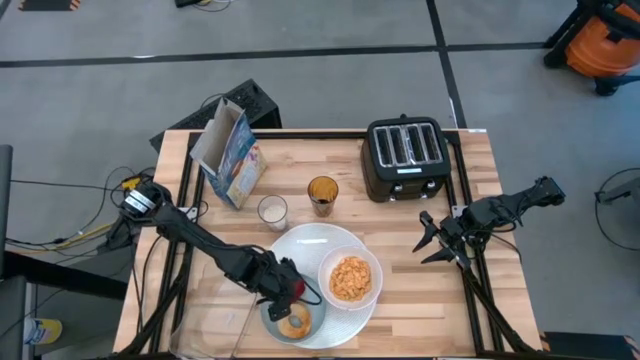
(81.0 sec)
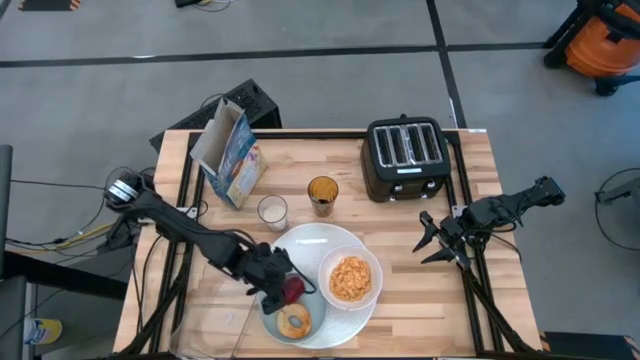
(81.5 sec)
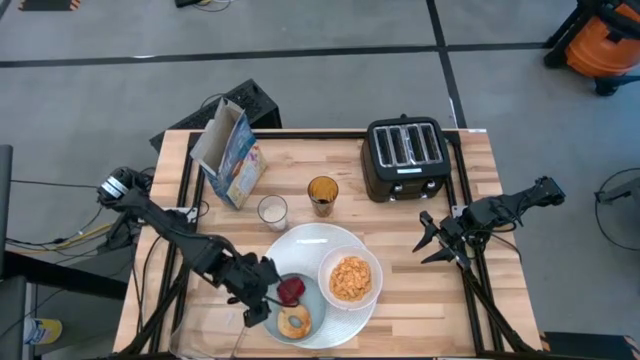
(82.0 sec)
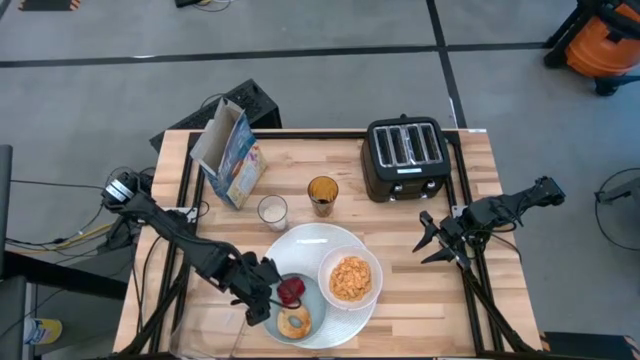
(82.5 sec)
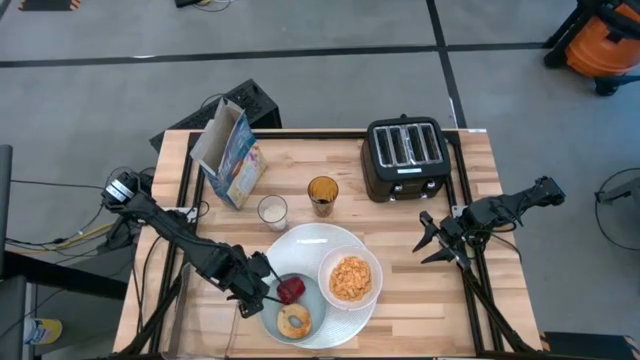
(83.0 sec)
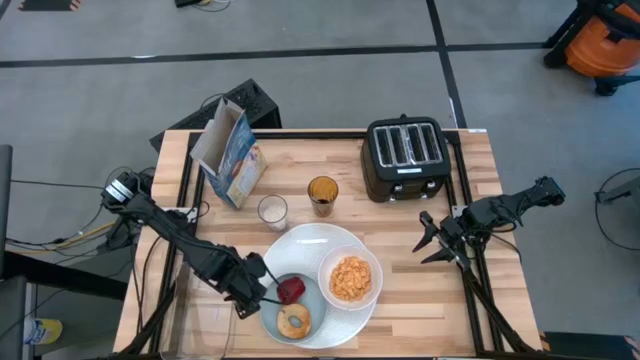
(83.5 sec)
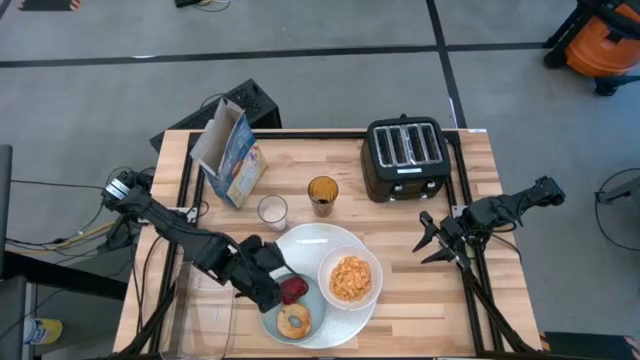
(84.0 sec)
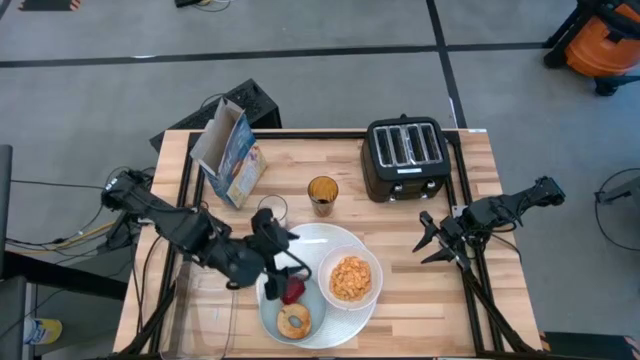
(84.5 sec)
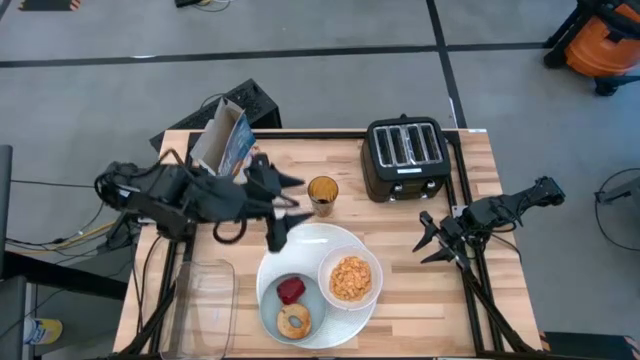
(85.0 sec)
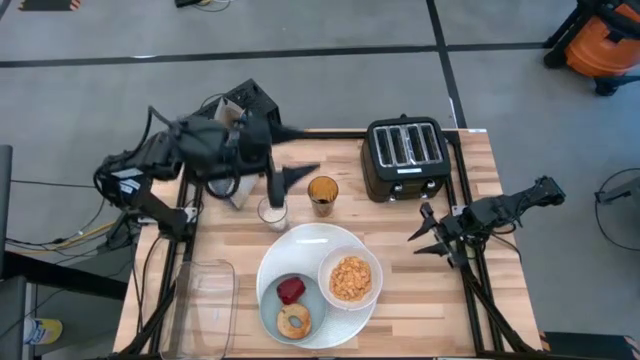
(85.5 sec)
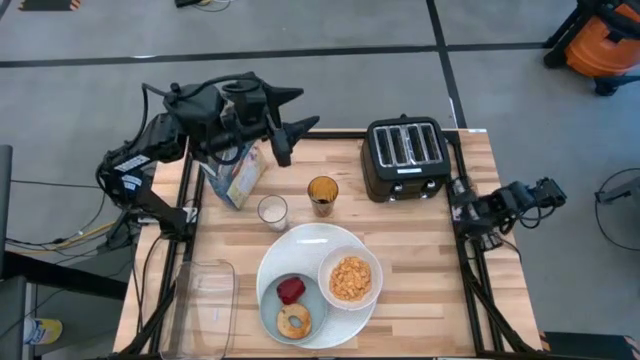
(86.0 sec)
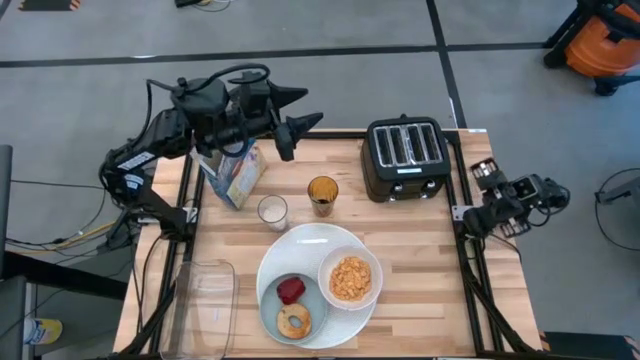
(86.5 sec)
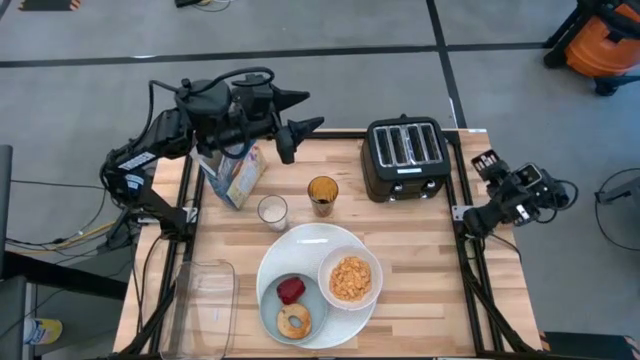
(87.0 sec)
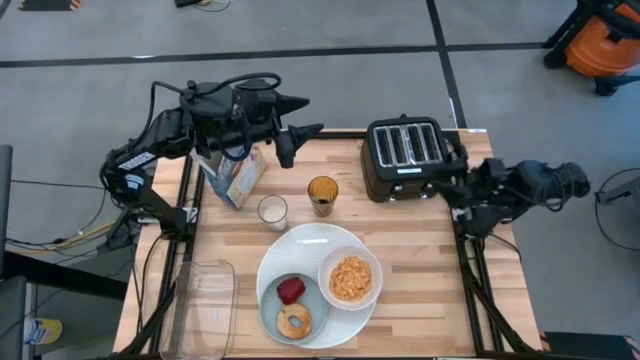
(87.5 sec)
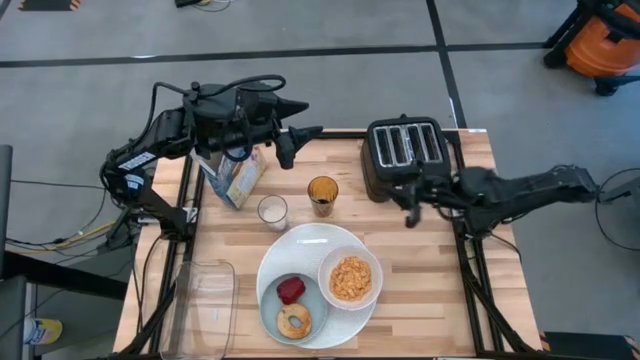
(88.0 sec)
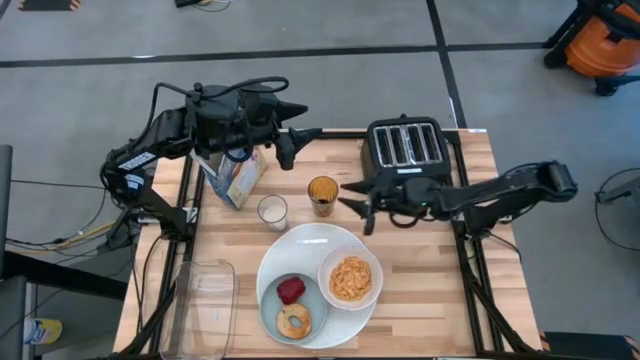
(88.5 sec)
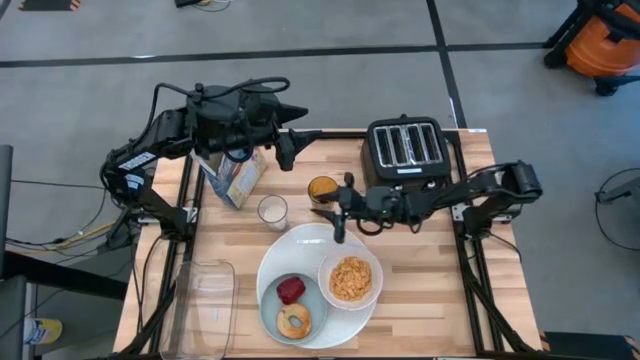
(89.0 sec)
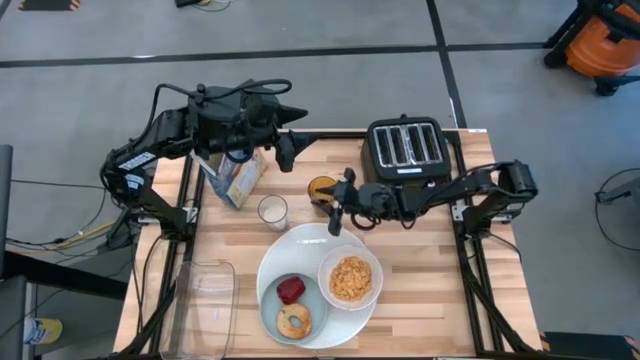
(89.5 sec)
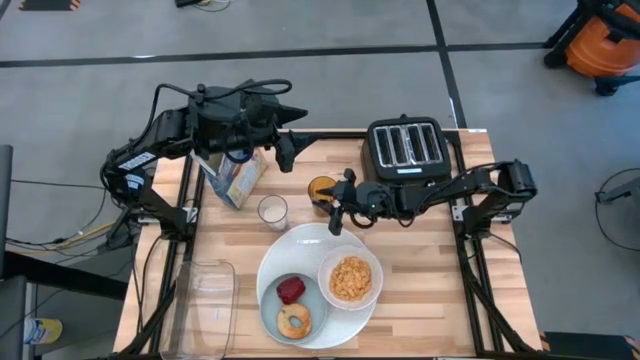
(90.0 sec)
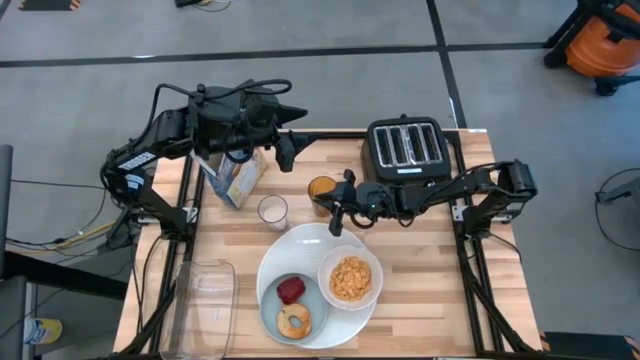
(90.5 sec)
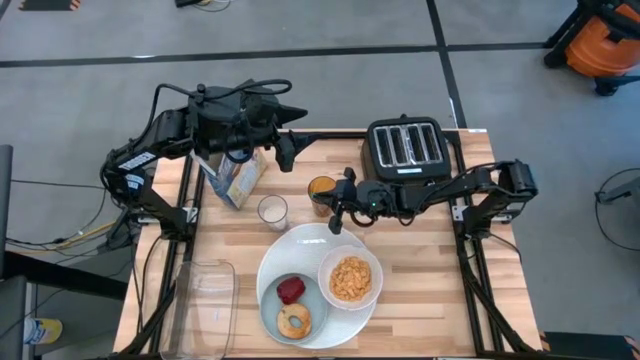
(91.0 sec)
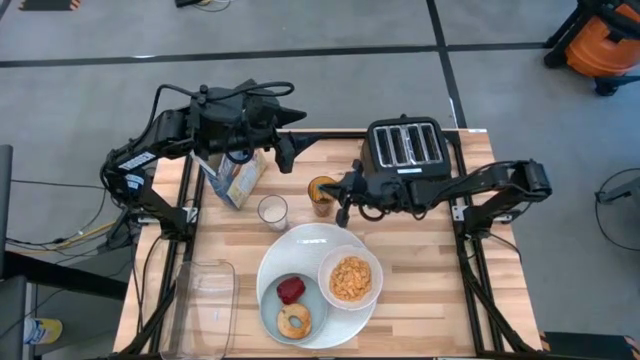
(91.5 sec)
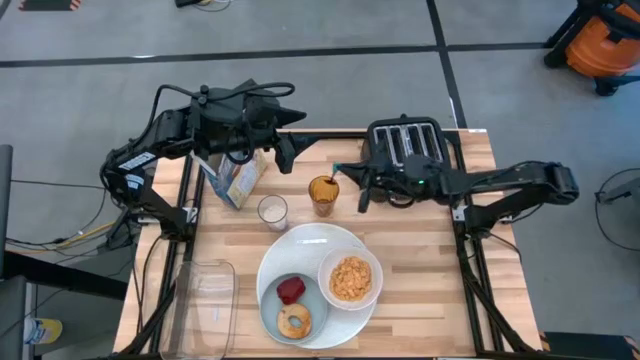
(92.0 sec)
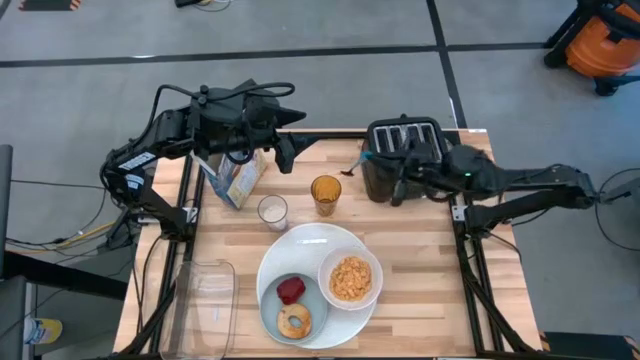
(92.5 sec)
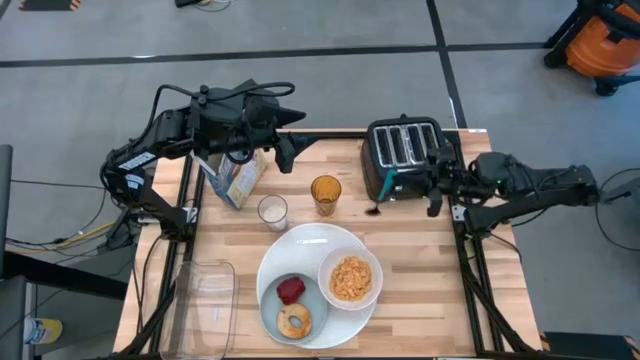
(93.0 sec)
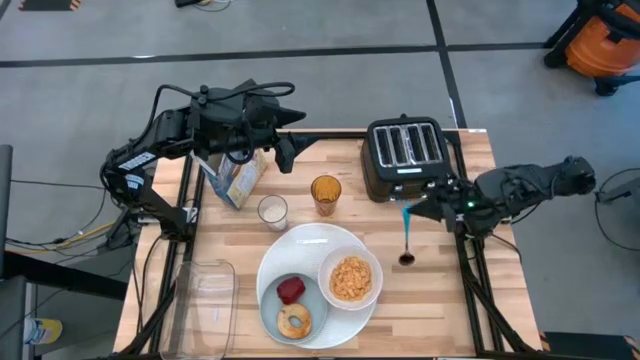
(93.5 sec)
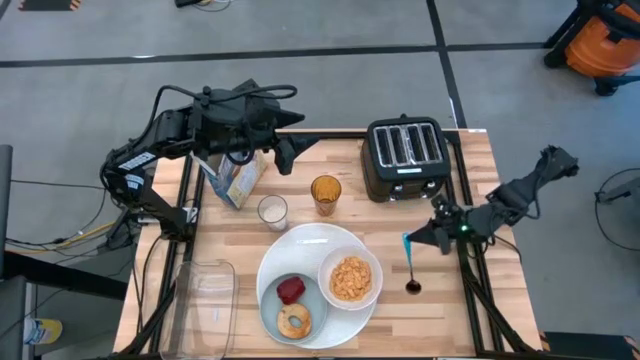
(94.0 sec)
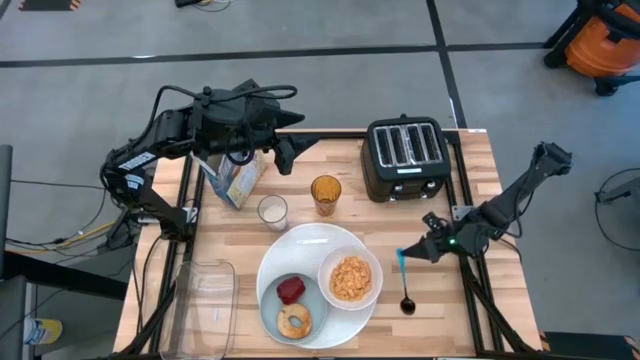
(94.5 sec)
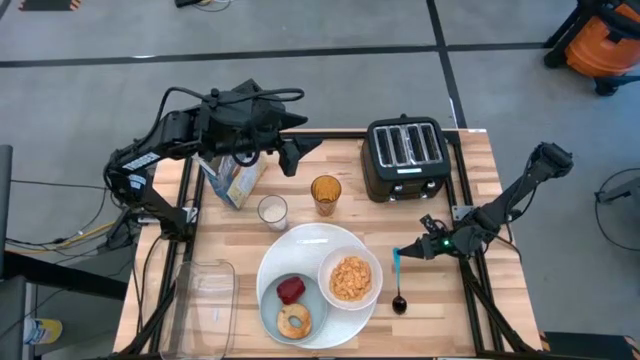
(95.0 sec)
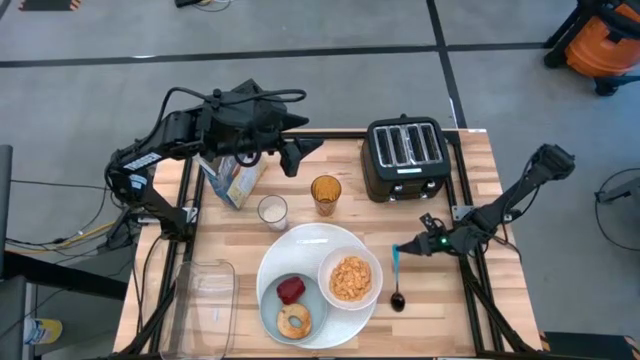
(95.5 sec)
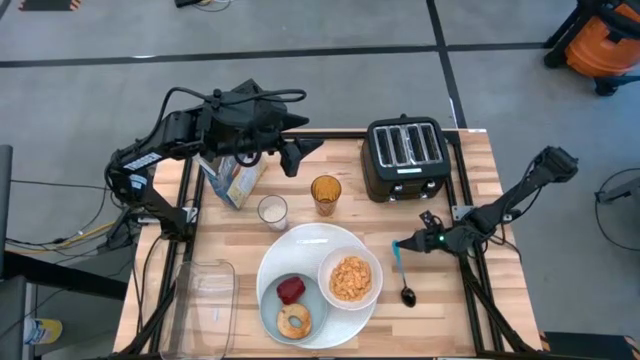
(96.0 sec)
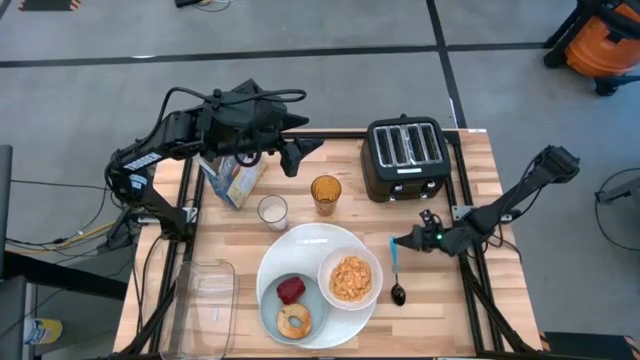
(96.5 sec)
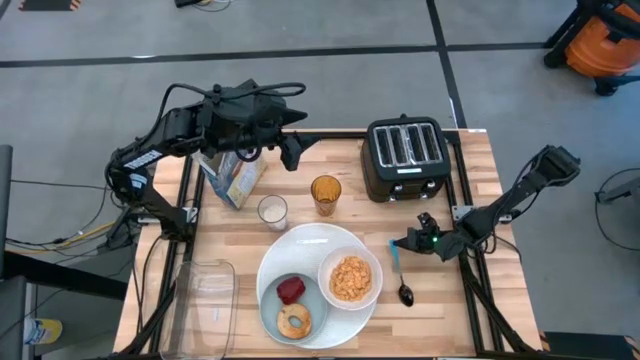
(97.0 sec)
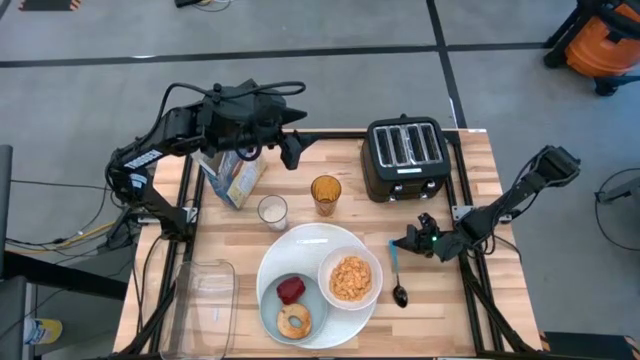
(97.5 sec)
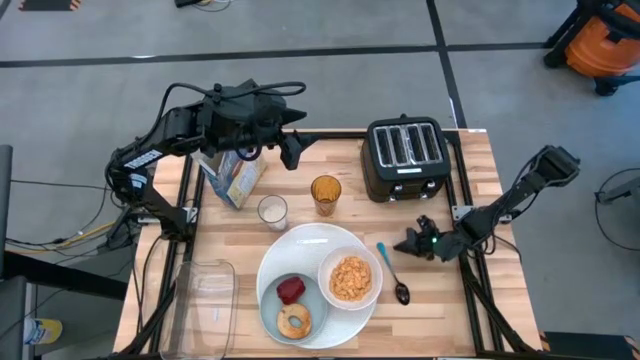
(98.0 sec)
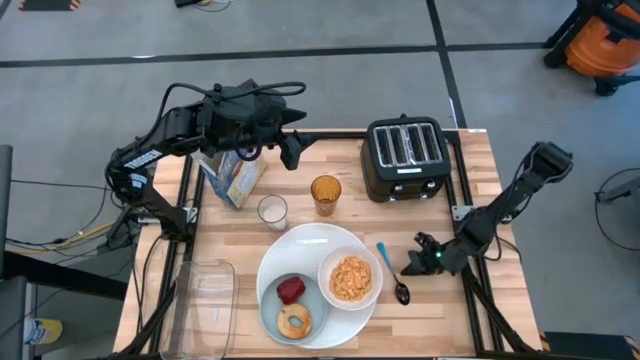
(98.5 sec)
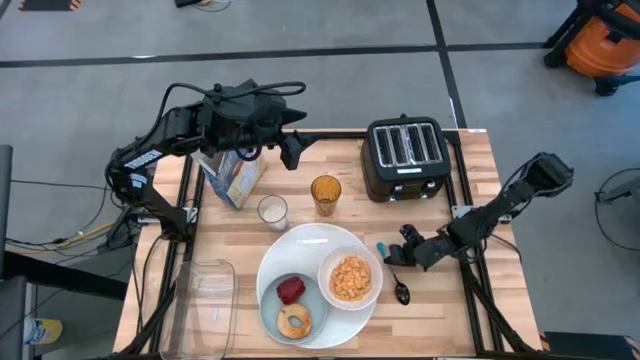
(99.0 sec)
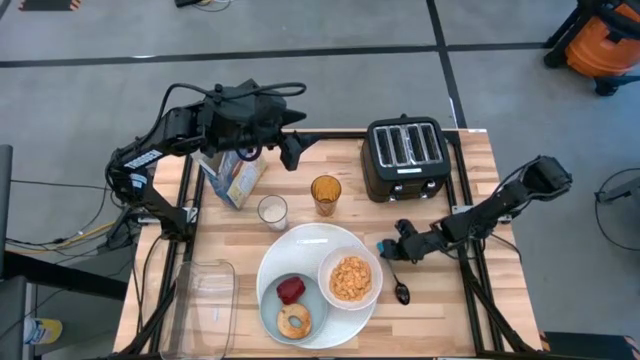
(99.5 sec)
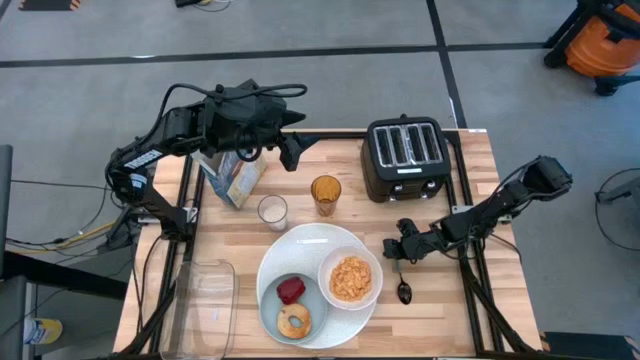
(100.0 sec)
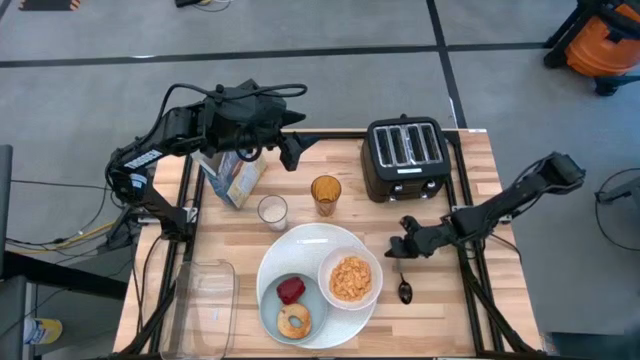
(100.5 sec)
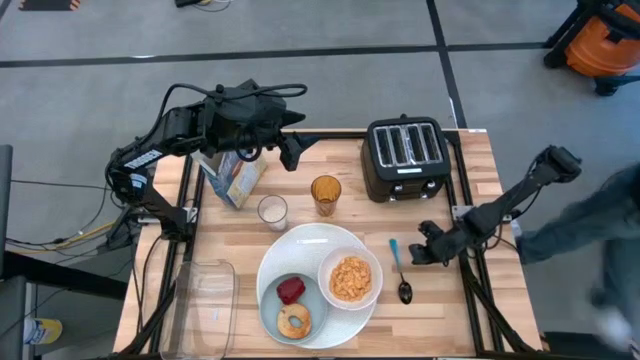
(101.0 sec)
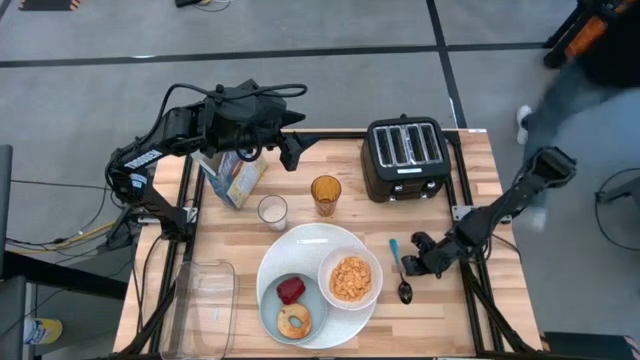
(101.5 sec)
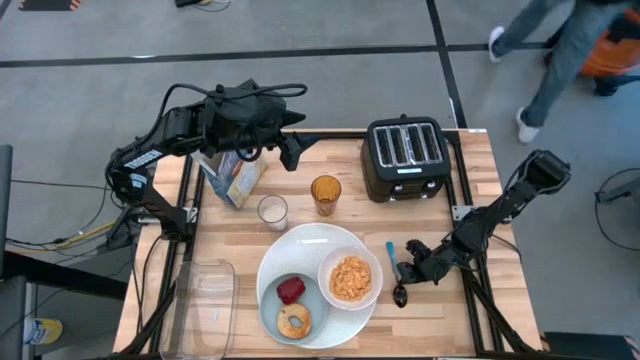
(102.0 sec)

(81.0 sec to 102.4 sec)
Task: Arrange a breakfast setting
Put the blue spoon beside the white placemat
